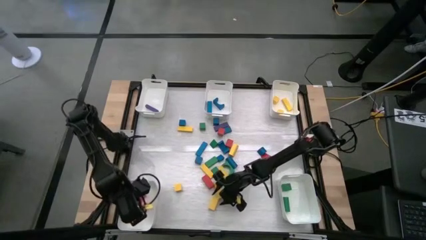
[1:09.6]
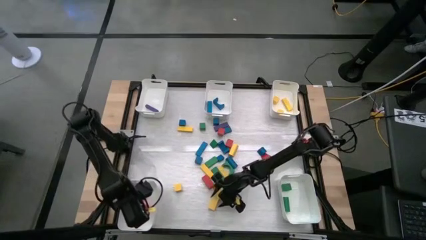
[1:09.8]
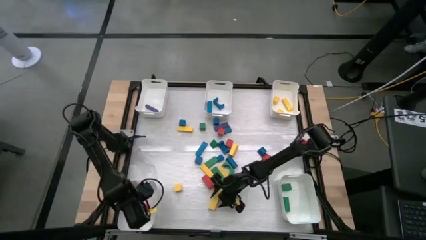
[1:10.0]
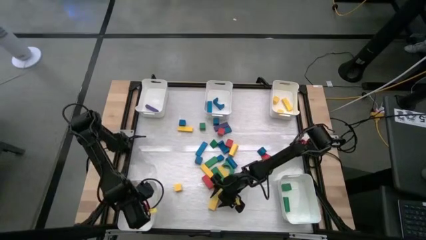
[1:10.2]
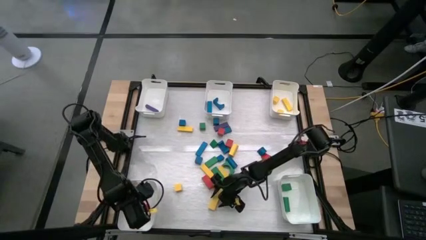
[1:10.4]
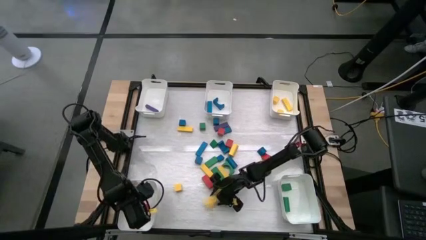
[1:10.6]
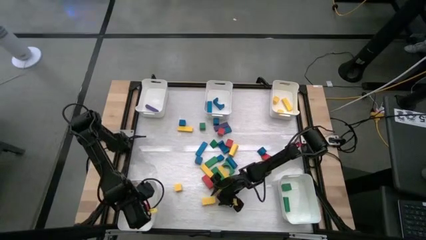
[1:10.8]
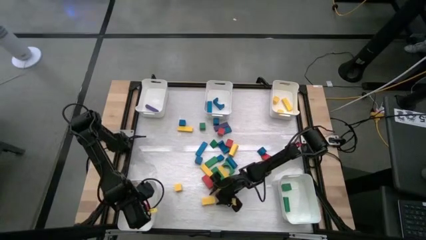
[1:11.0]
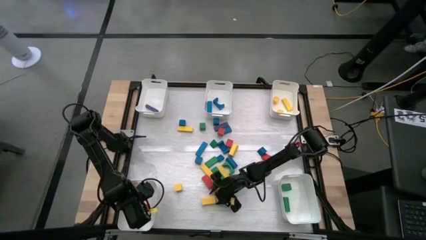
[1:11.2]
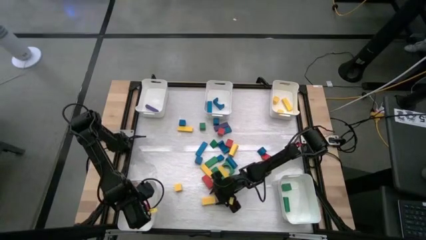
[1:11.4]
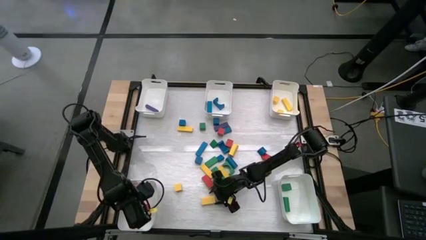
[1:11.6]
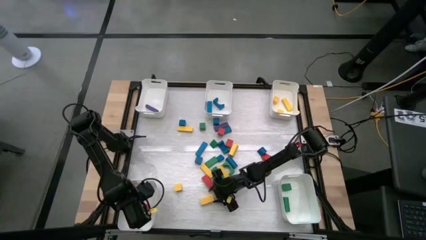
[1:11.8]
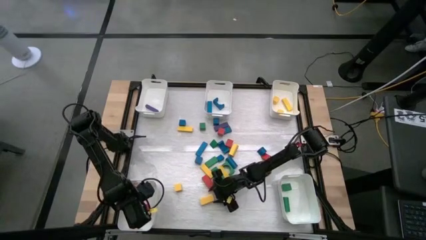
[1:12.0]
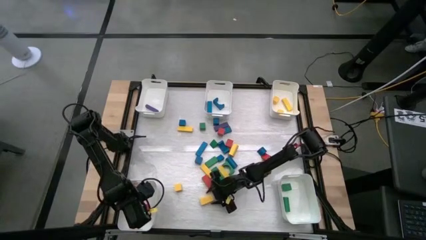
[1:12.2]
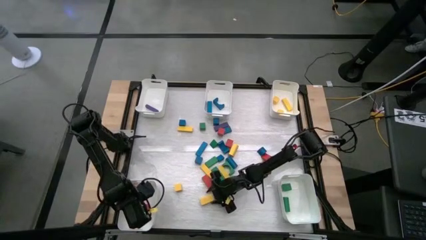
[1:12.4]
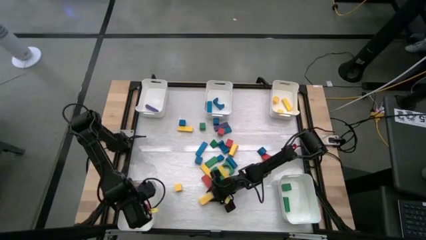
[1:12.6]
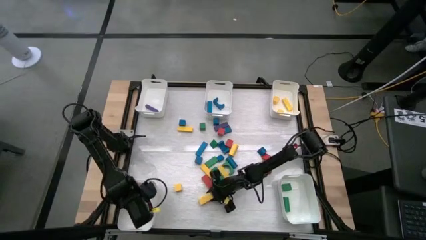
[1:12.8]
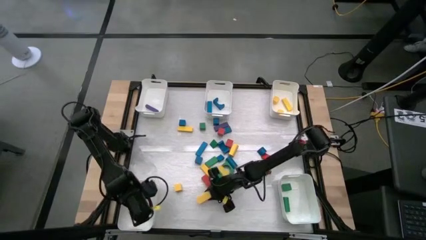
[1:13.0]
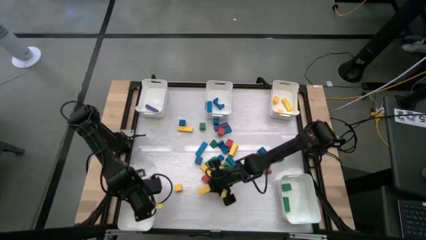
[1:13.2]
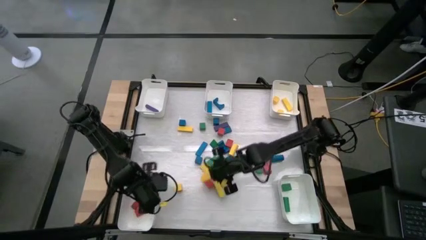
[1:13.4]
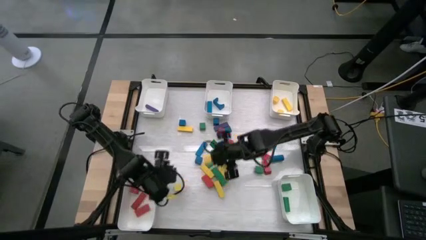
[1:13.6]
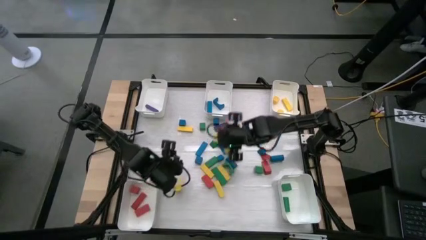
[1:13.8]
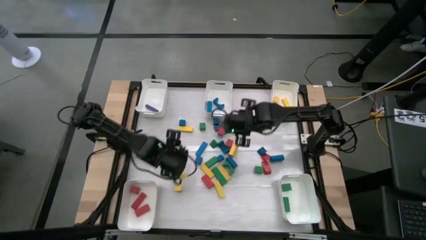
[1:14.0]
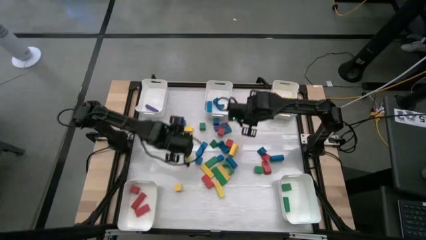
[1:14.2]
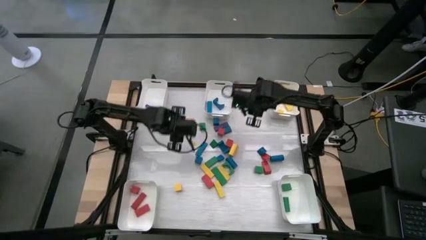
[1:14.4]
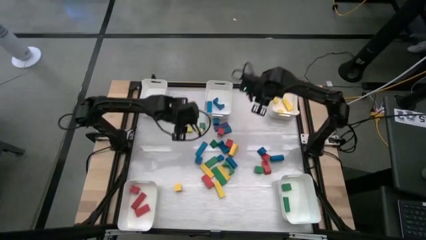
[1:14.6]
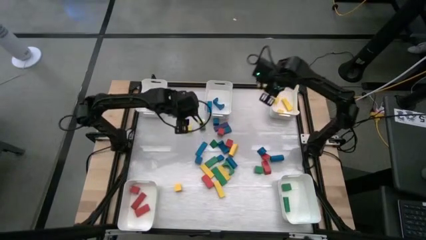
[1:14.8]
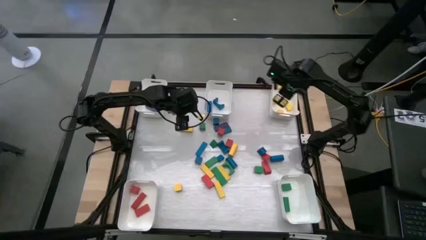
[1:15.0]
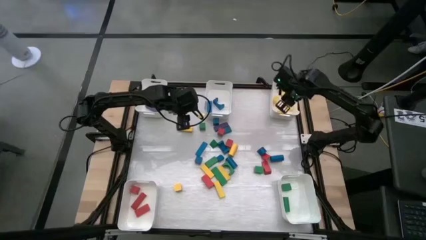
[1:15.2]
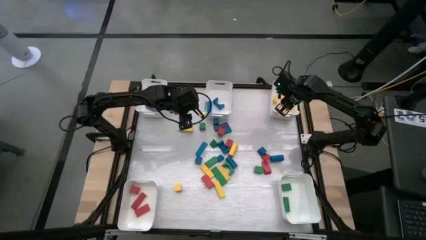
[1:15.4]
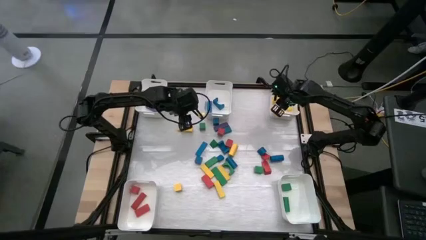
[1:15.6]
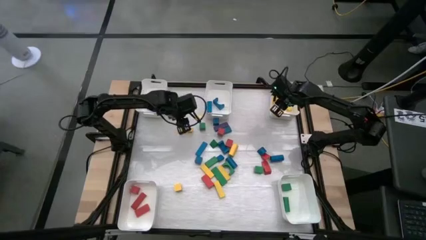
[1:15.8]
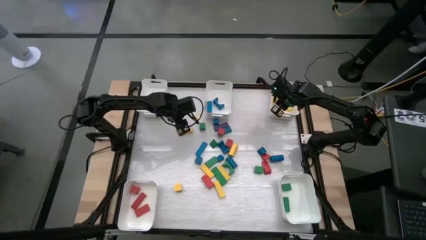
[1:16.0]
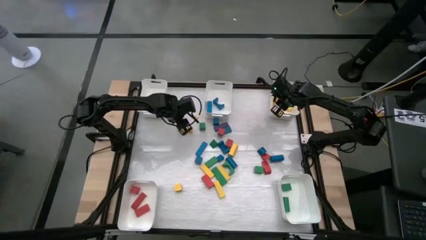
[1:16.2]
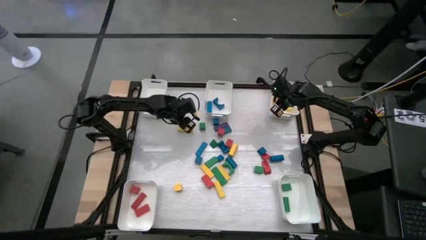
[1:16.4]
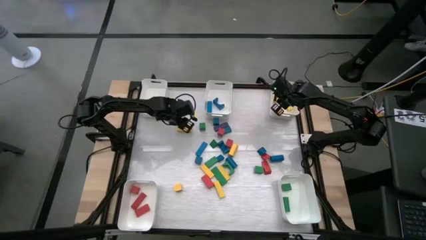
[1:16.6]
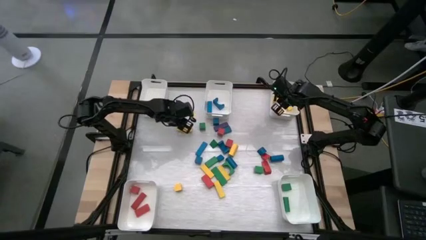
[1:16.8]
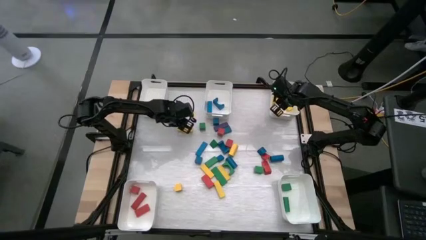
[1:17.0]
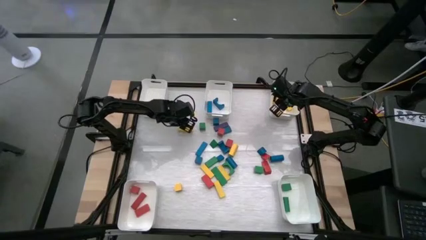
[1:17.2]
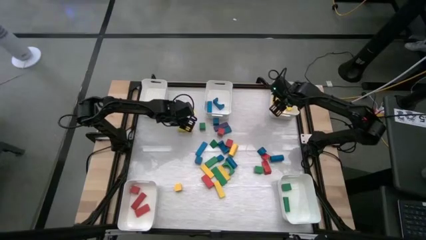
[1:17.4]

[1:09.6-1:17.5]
Task: Sort blocks
Put the yellow block into the top right white bin

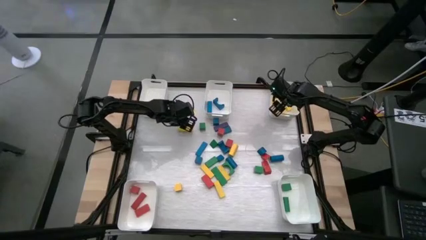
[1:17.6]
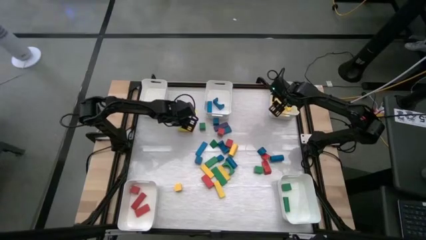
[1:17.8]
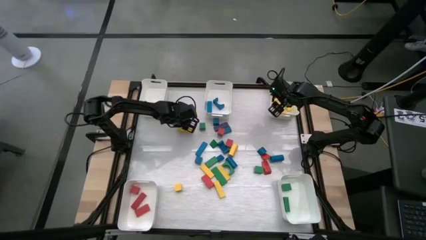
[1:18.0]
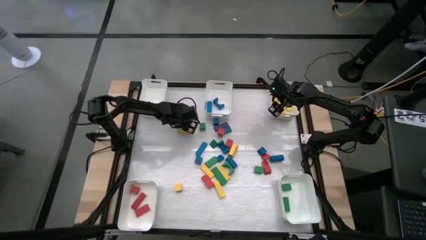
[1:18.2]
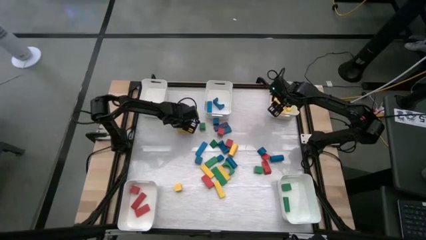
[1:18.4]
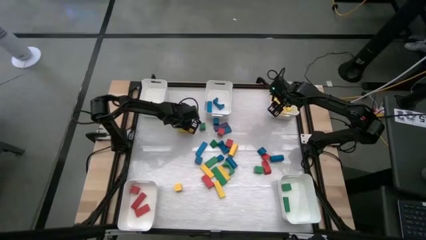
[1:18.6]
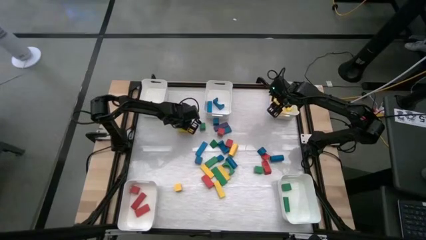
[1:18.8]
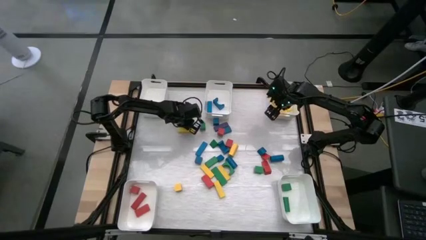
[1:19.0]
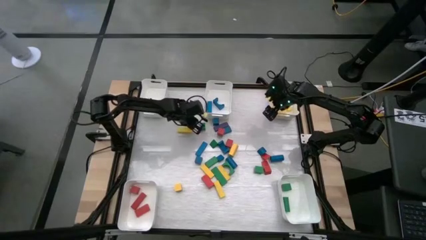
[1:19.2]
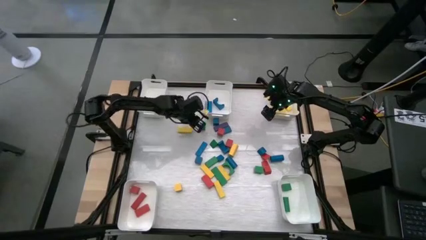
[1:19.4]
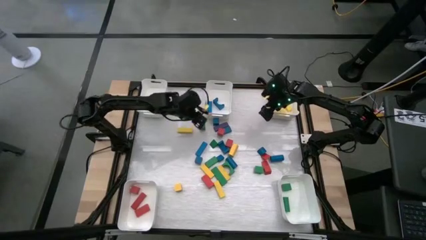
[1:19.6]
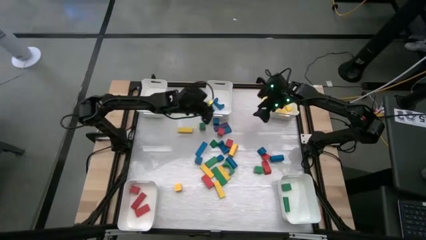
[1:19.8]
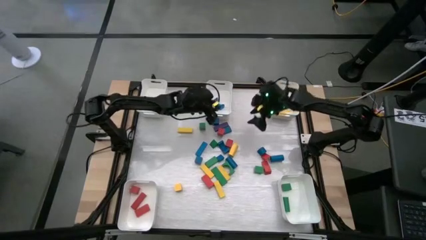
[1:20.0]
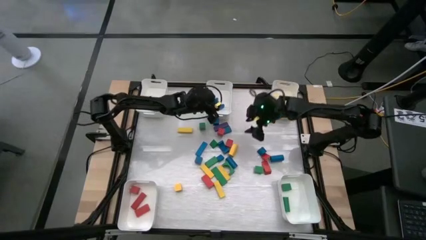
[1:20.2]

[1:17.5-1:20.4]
Put the blue block into the top center white bin

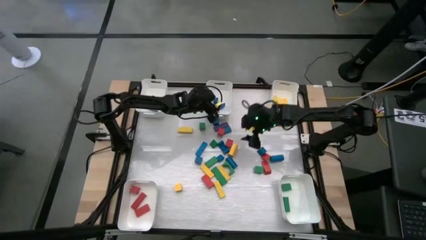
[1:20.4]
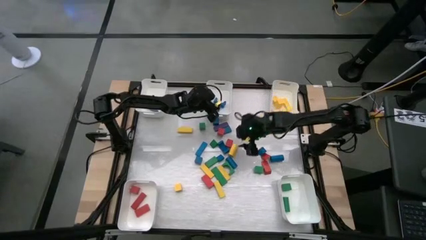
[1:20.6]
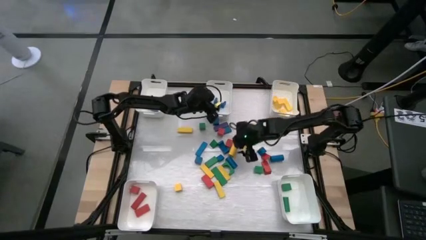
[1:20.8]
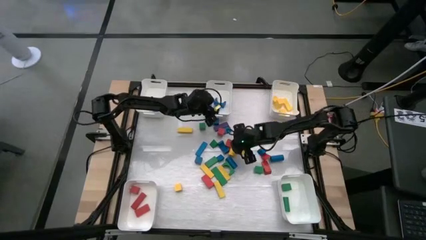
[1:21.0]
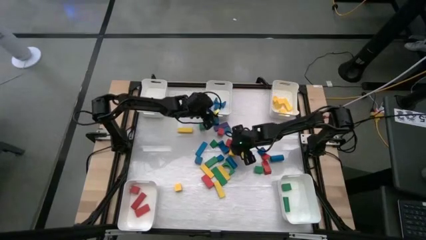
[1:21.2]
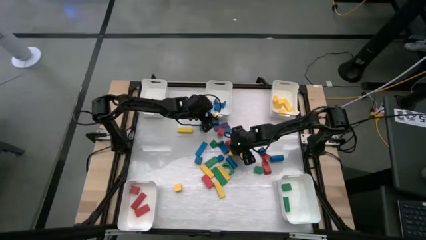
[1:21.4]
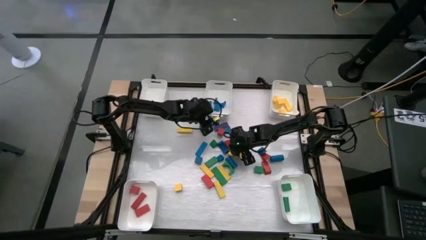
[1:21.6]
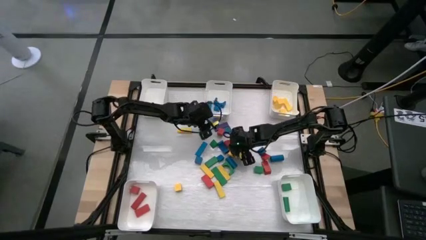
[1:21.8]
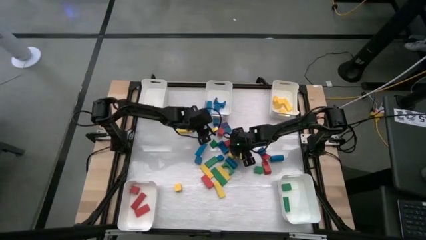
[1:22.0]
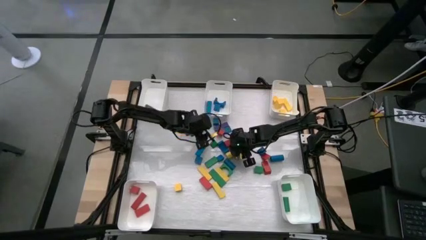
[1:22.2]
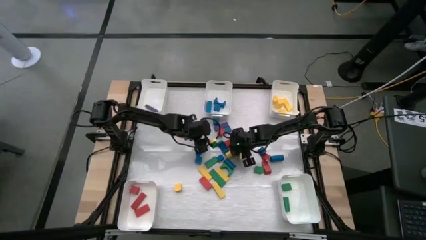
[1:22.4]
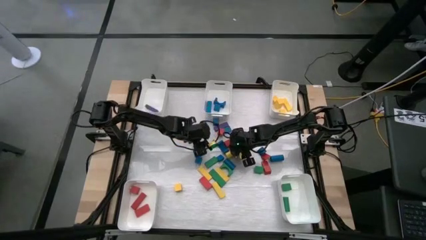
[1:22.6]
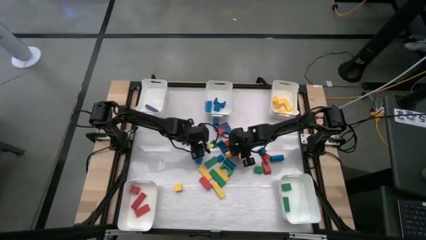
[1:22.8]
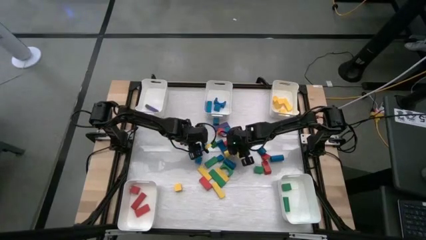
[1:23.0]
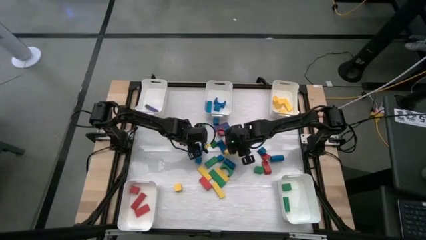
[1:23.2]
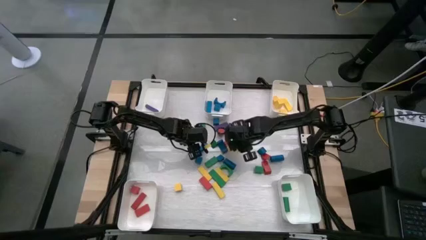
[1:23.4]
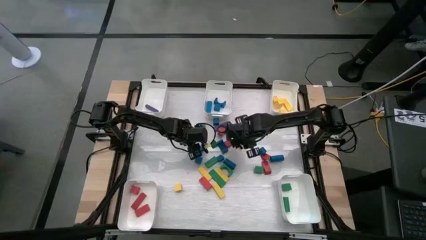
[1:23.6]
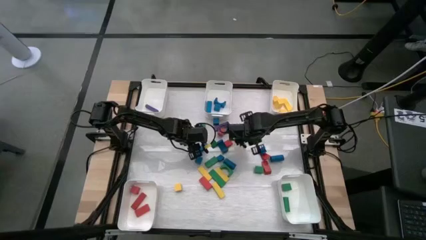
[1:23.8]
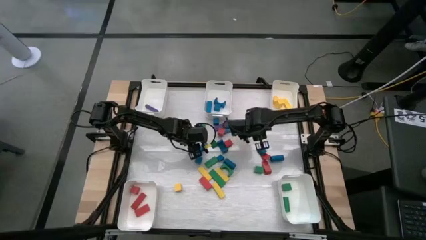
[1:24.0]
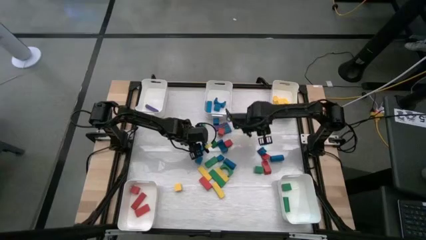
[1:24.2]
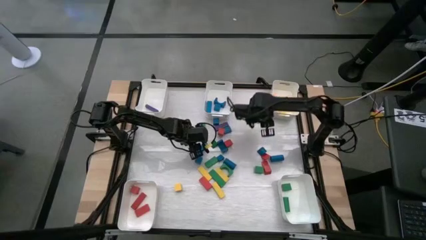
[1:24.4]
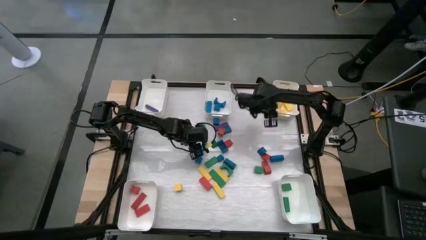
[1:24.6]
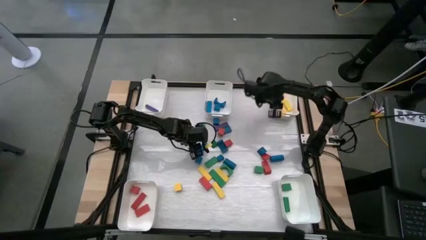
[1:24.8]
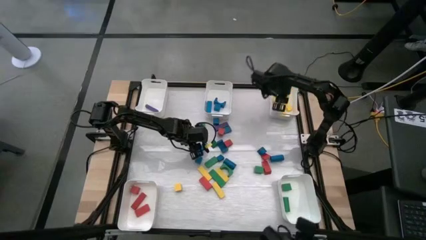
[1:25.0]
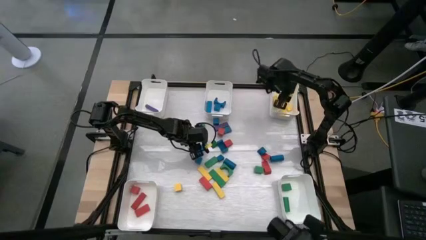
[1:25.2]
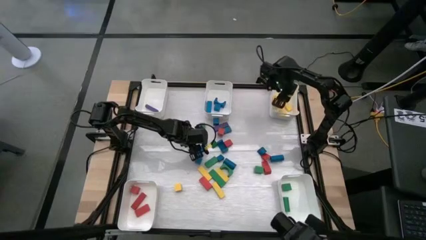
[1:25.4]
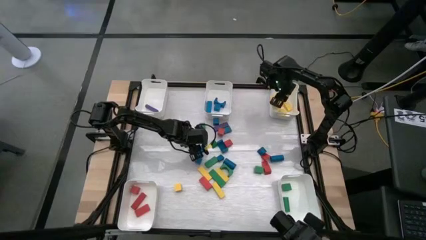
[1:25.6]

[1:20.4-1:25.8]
Put the yellow block into the top right white bin

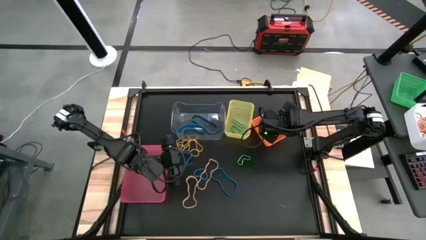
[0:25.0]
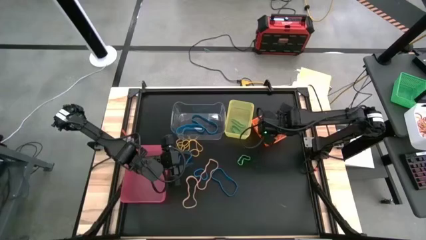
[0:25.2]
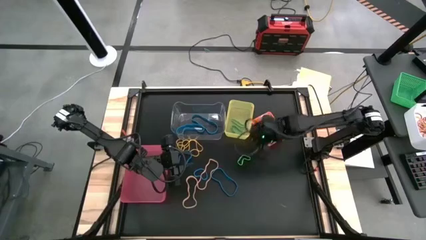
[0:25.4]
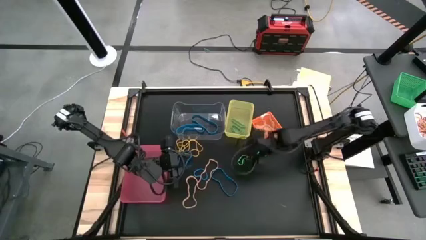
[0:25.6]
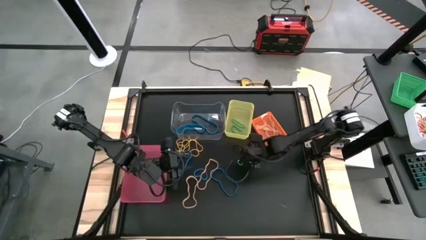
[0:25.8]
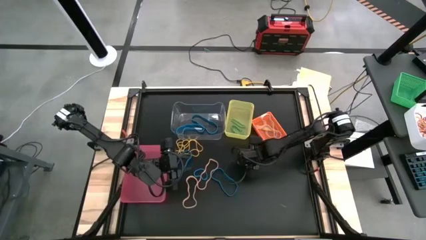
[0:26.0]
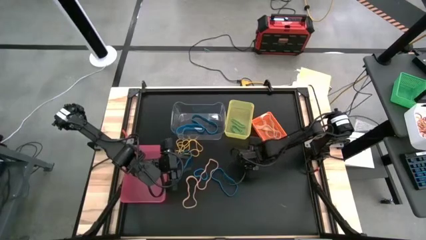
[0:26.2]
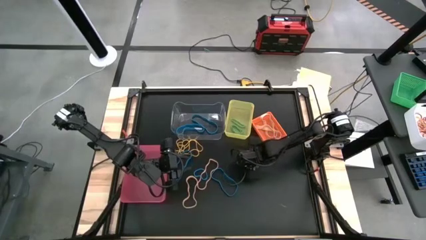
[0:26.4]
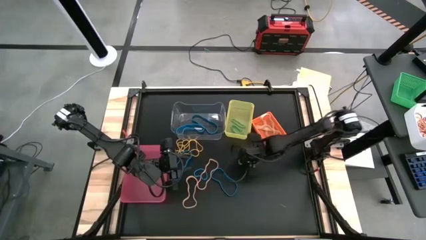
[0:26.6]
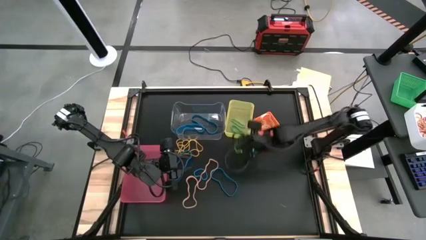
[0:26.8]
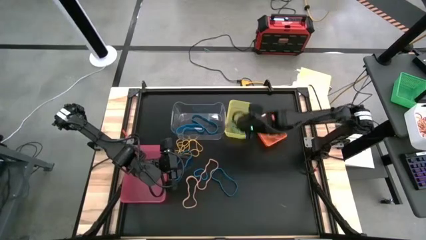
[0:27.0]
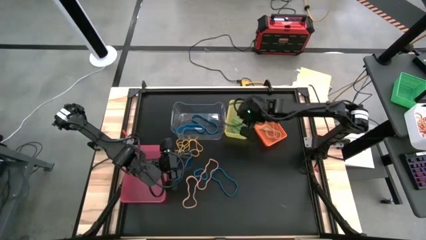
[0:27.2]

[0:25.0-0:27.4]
Task: Sort rubber bands into baskets
Put the green rubber band into the yellow bin
